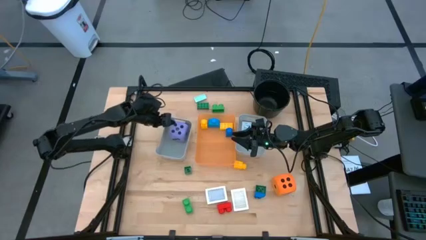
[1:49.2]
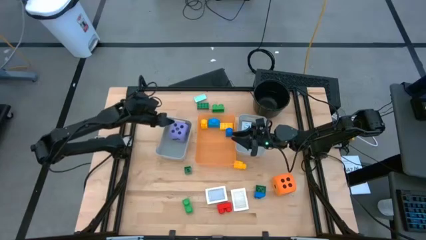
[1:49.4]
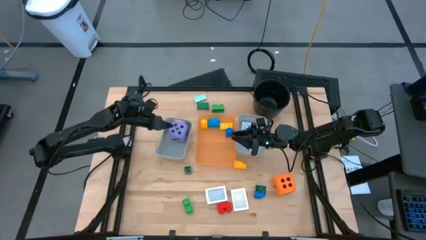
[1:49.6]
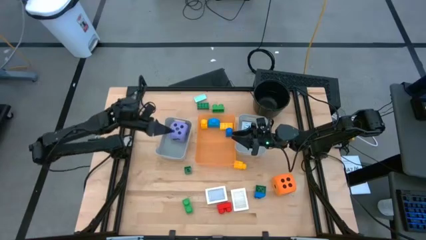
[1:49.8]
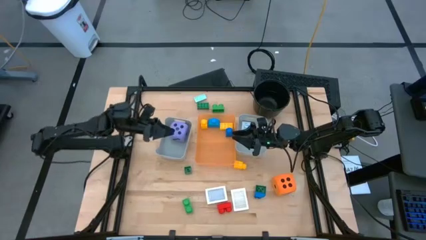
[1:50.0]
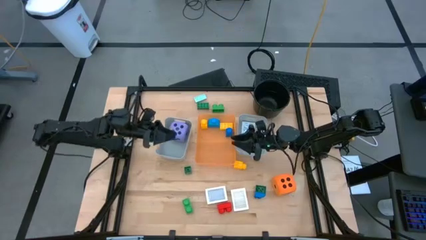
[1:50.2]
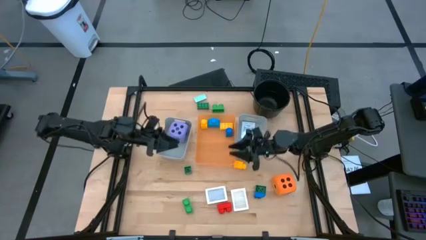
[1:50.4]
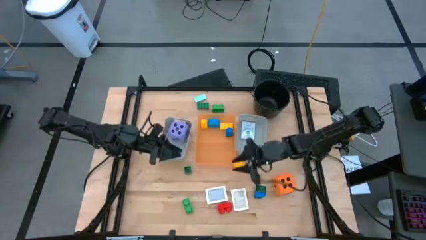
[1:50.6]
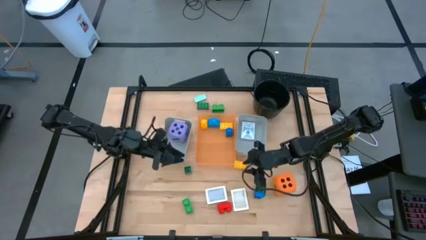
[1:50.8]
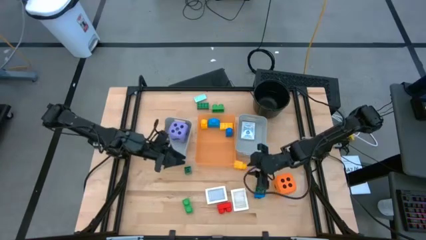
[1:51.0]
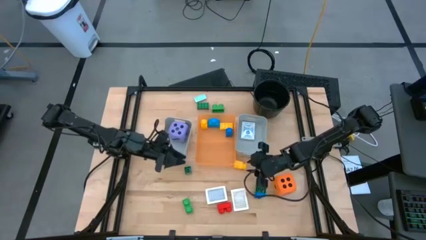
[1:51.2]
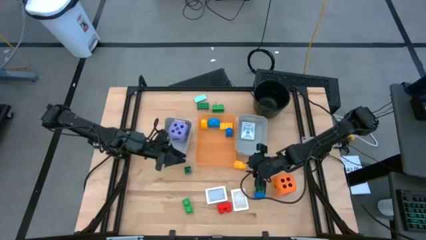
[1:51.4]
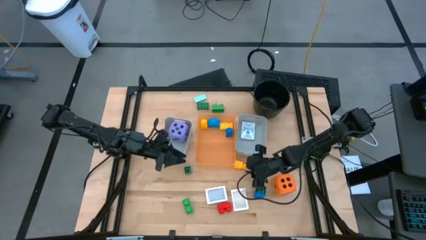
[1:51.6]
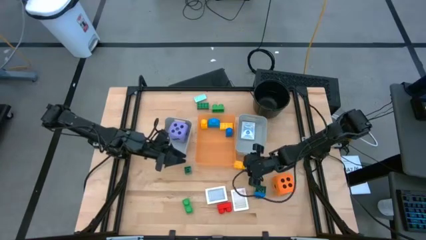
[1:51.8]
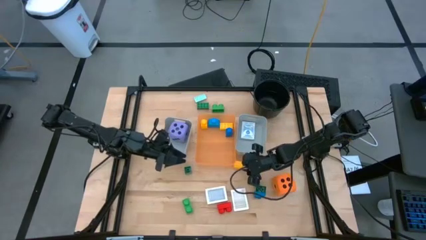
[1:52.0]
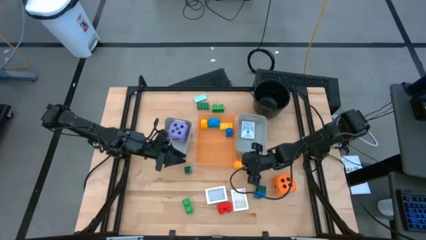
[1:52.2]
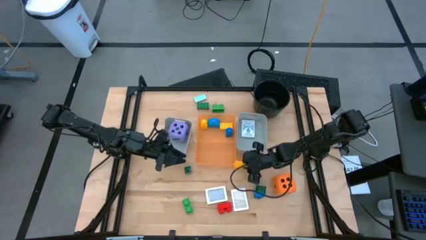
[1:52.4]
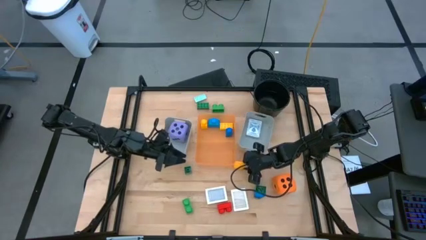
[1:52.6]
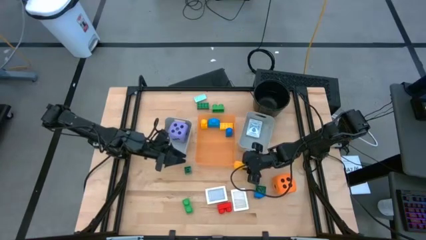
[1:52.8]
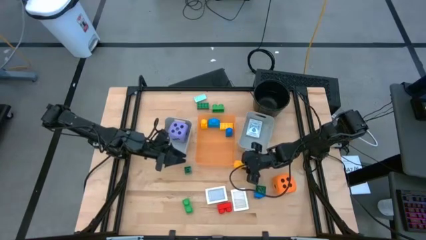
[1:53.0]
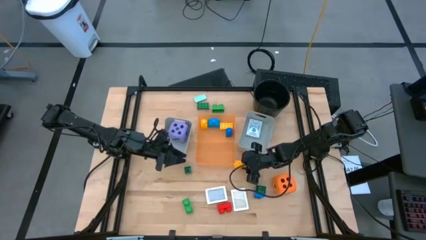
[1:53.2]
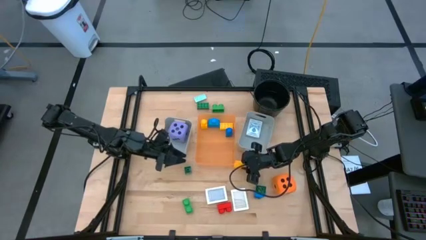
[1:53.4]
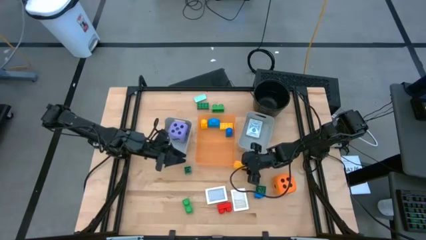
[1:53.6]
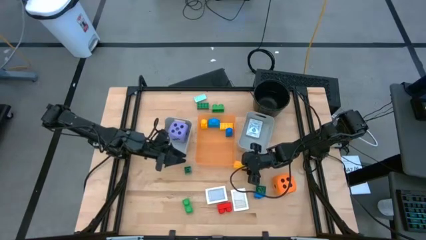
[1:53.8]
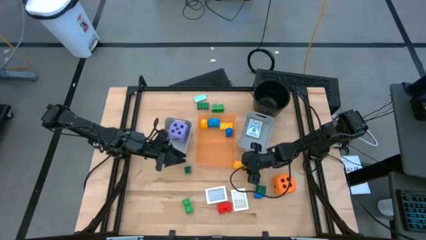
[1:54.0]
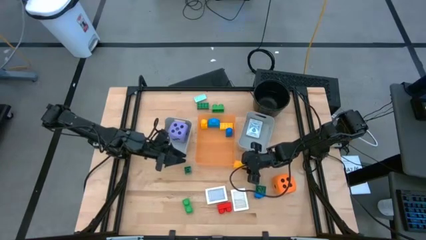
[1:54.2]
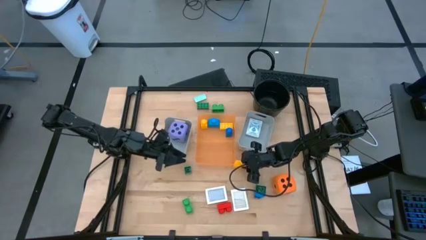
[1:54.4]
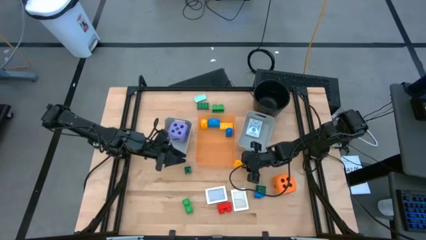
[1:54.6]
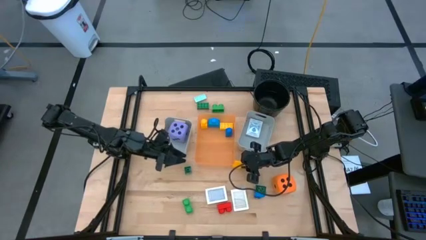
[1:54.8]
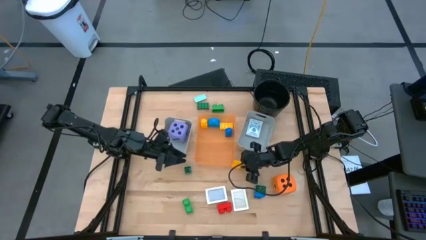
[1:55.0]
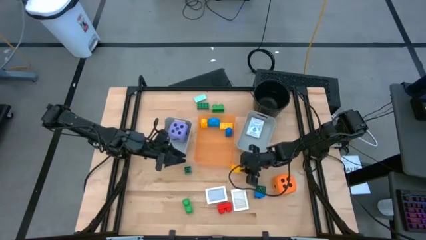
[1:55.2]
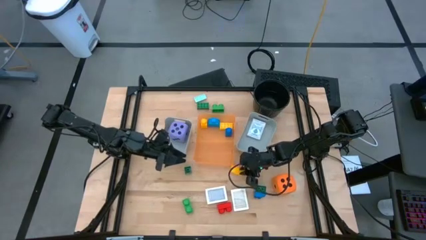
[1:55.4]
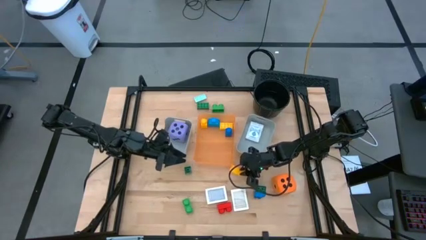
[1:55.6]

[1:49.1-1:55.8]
Task: Pick & Place Toys
Put the yellow game piece into the orange bin

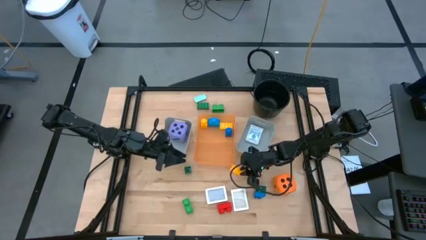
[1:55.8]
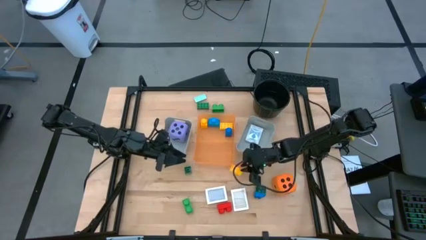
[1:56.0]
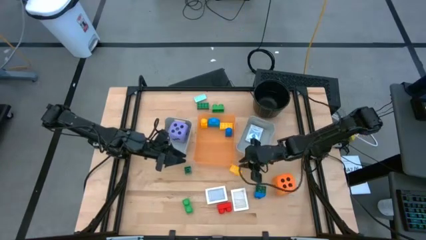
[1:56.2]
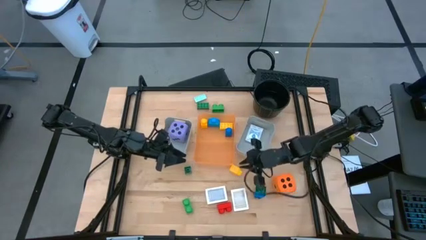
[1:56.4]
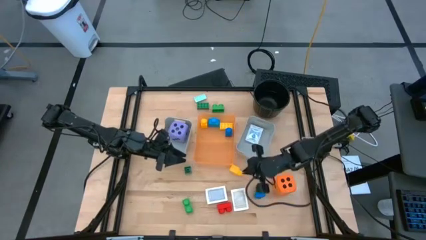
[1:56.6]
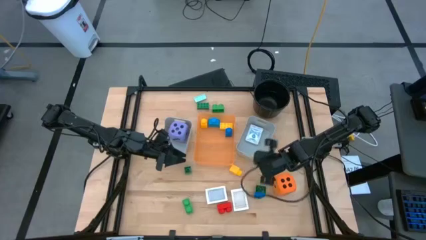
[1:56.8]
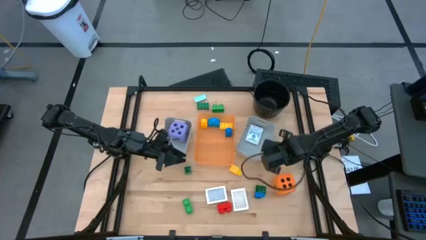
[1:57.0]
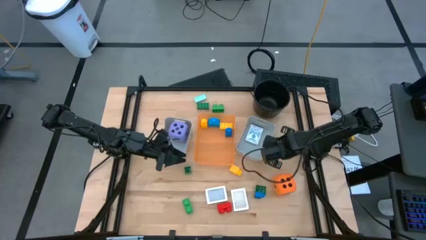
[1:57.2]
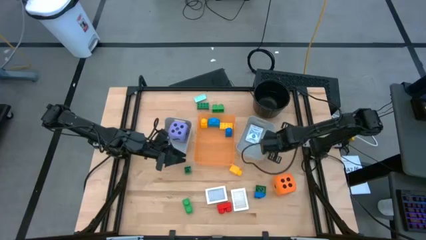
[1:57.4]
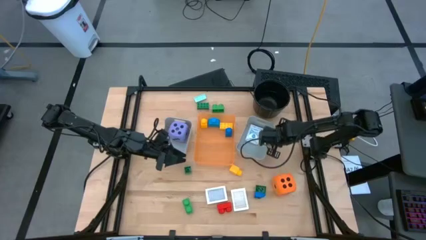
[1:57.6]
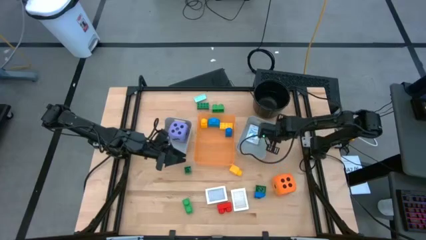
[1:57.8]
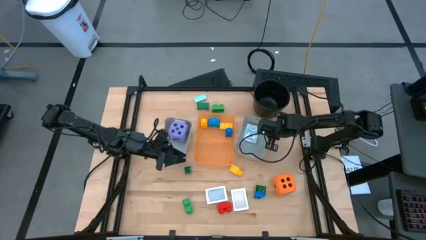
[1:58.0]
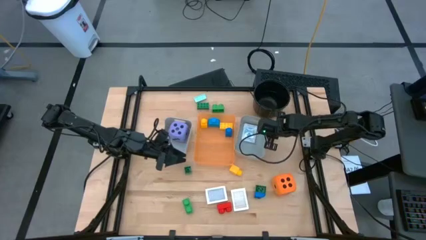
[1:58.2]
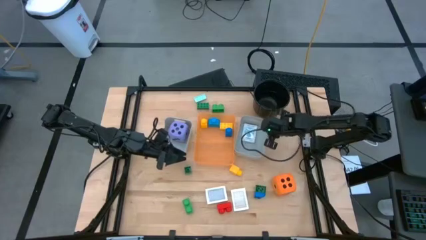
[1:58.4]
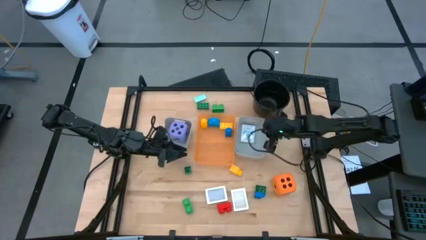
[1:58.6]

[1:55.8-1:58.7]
Adjust the right gray bin

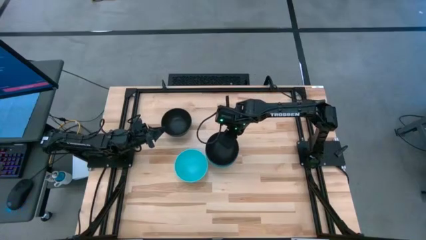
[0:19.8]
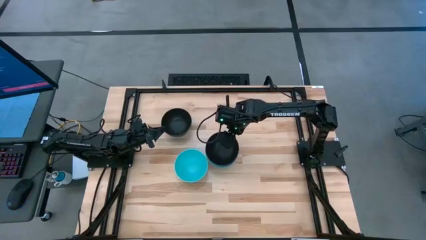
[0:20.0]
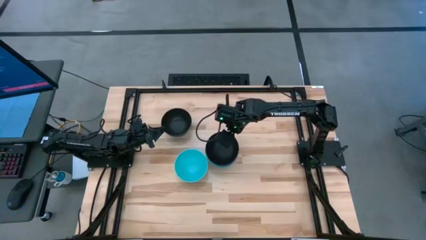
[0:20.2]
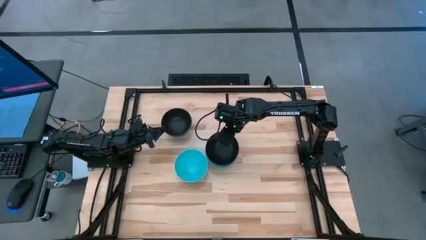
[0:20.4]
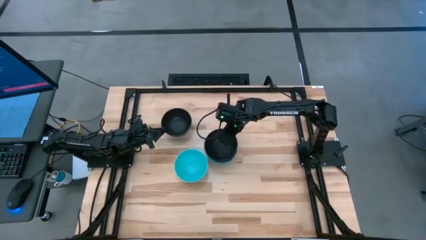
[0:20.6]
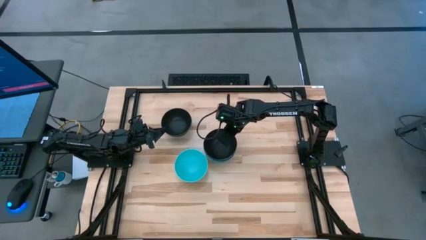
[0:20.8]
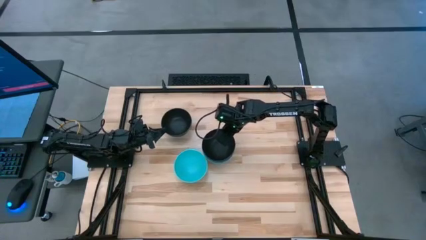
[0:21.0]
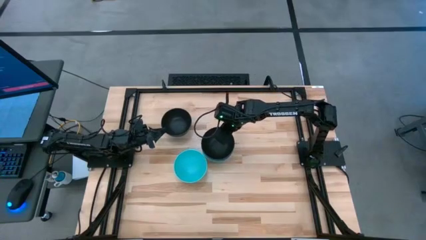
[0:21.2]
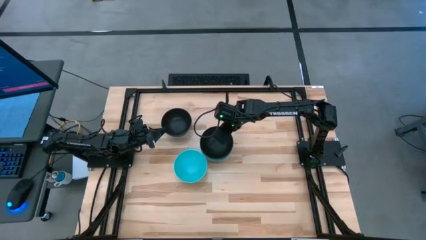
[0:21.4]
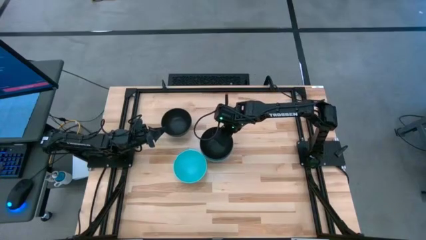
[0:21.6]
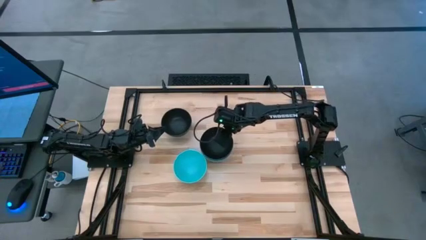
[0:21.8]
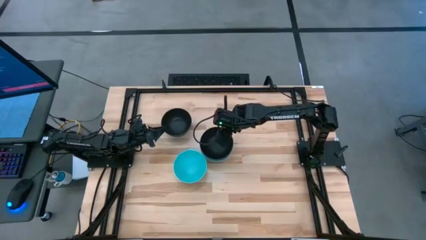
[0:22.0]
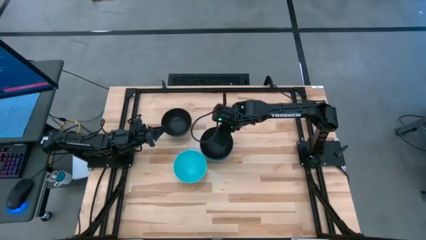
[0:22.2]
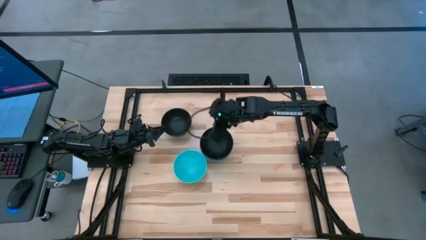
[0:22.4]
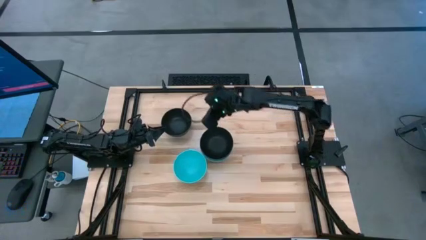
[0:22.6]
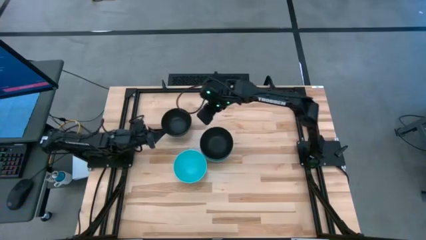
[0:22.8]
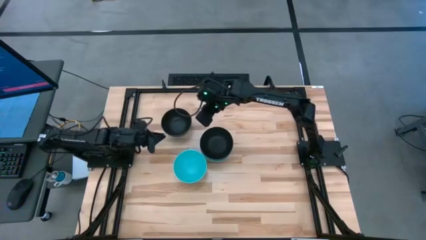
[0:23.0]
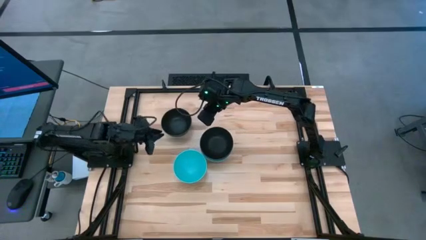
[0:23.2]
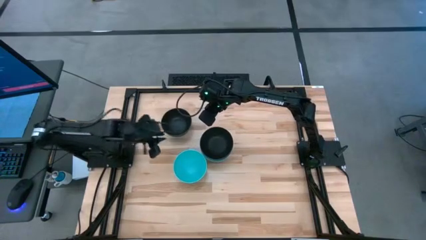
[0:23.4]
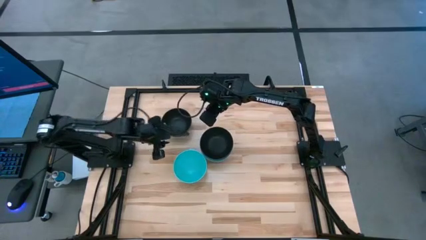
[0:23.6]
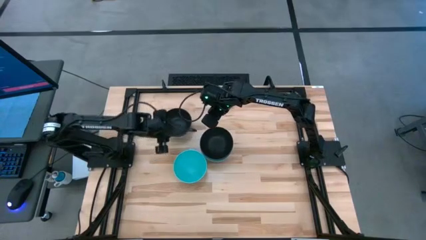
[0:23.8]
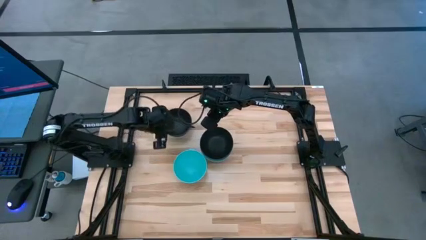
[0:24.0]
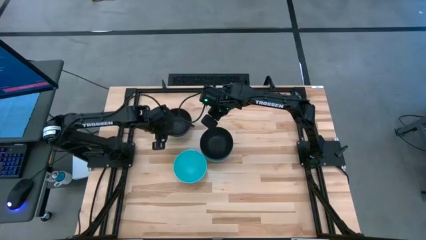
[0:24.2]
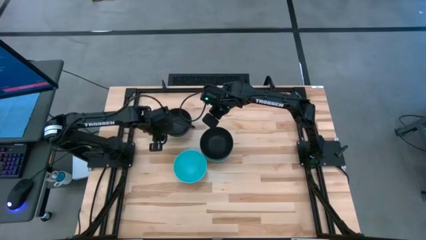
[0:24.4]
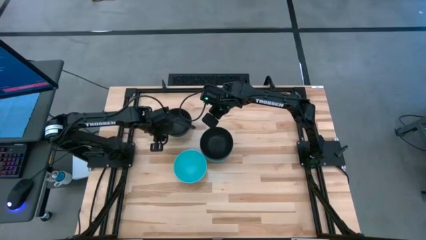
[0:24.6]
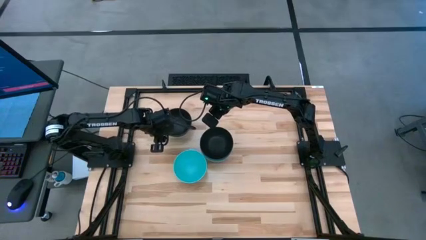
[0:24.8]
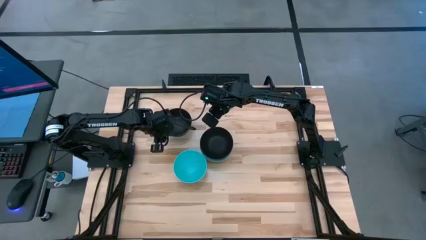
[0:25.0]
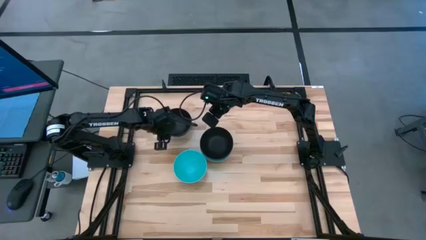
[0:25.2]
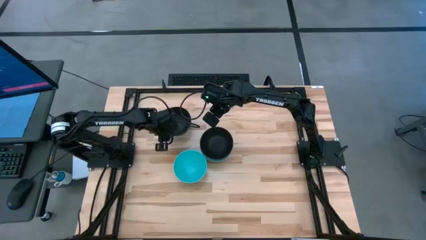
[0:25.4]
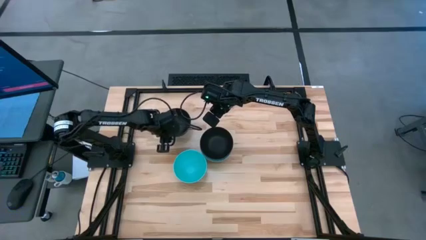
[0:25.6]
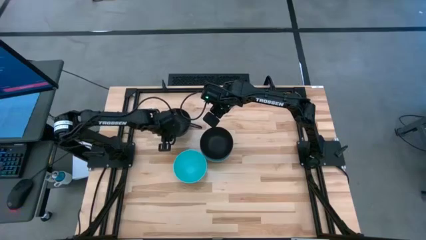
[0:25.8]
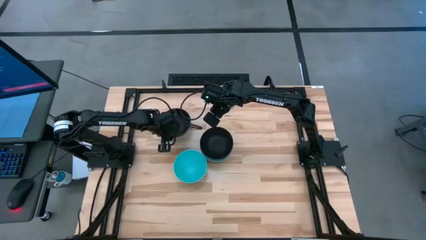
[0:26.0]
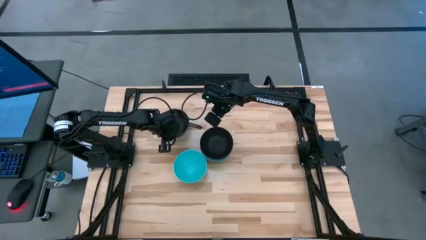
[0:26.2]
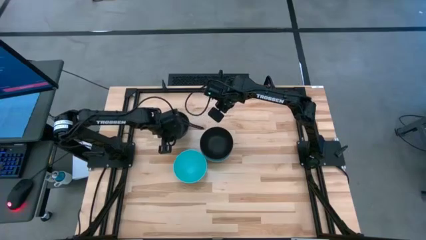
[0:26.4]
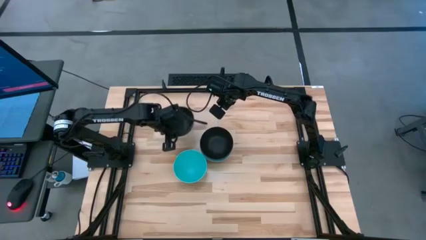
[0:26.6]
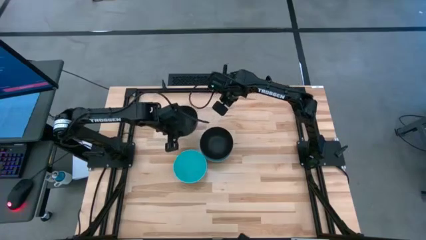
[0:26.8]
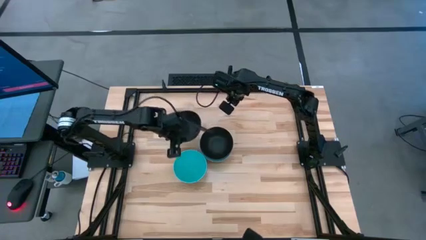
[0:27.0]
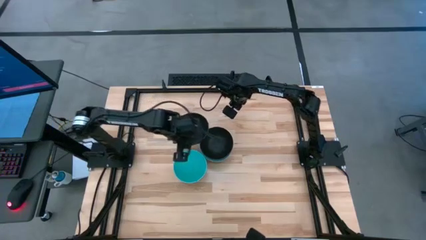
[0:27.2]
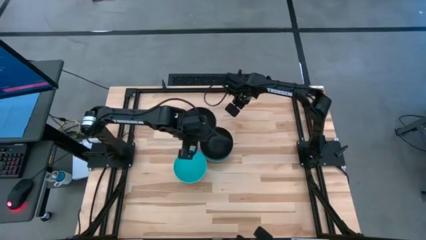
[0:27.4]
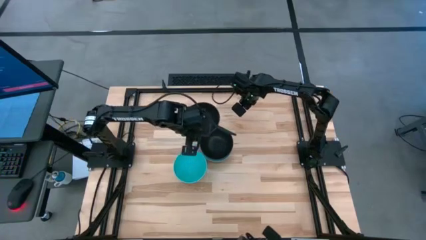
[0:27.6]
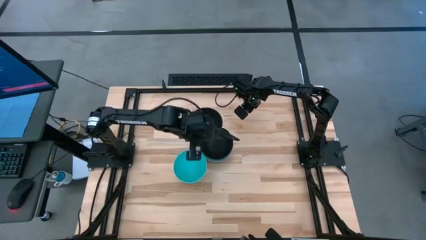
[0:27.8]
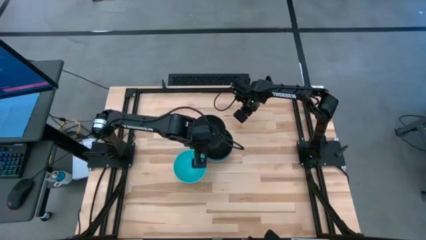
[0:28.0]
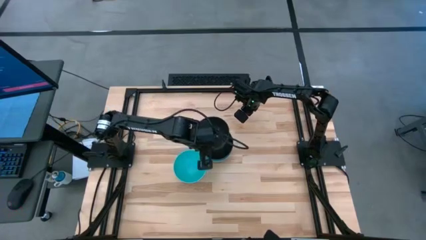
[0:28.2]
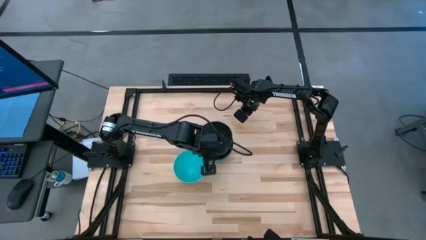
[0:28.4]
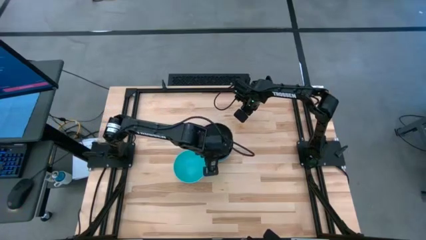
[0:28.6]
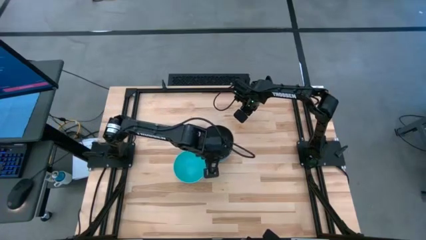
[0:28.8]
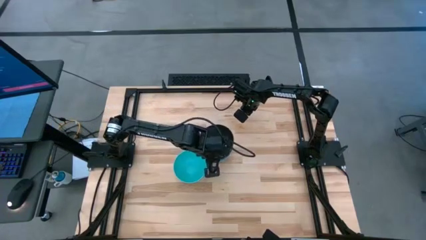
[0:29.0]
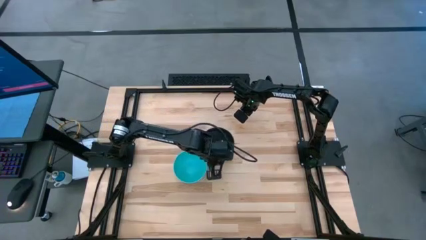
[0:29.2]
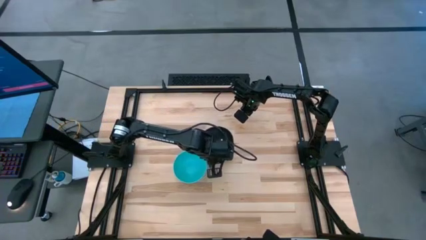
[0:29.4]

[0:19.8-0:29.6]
Task: Nest bowls inside each other
Stack the black bowl on top of the right black bowl
